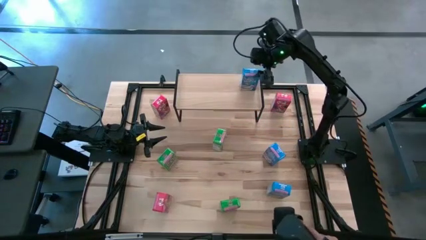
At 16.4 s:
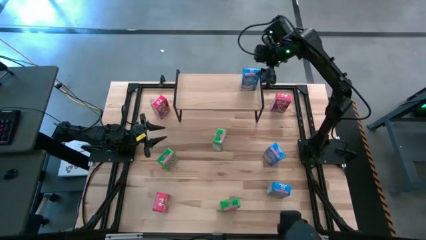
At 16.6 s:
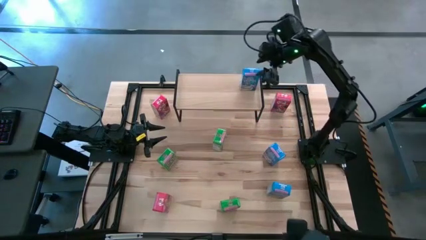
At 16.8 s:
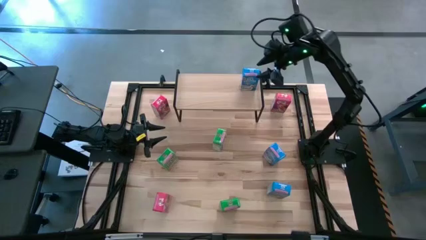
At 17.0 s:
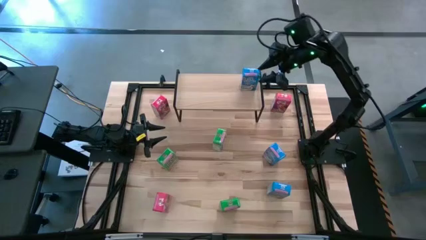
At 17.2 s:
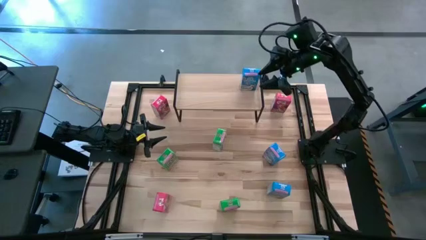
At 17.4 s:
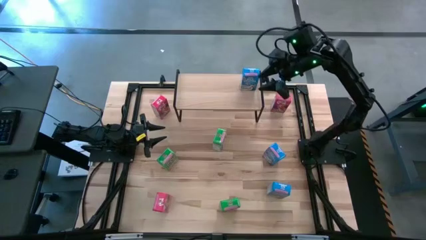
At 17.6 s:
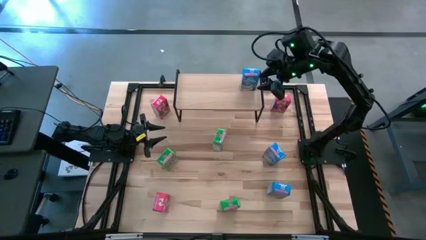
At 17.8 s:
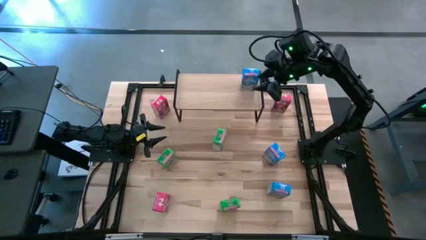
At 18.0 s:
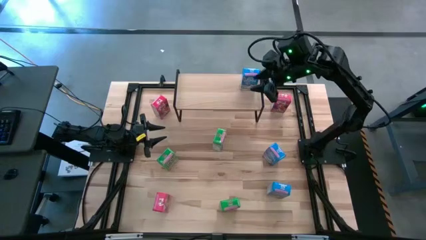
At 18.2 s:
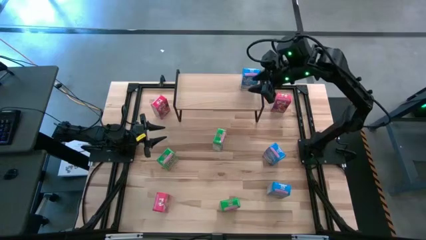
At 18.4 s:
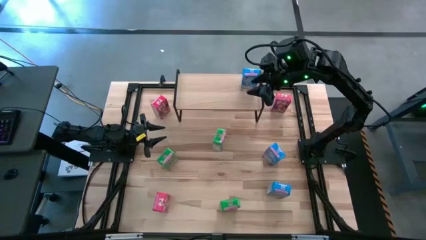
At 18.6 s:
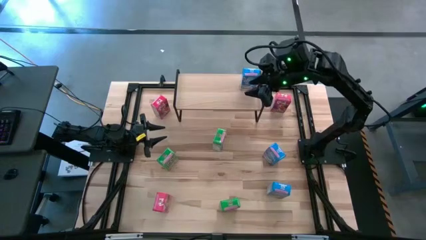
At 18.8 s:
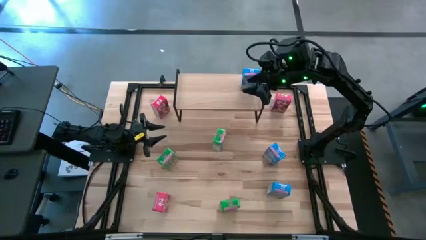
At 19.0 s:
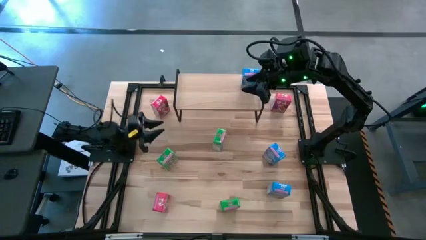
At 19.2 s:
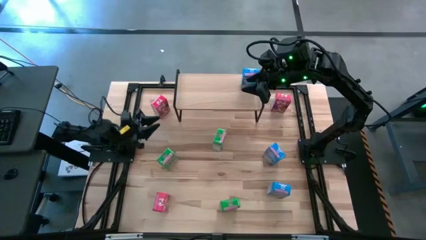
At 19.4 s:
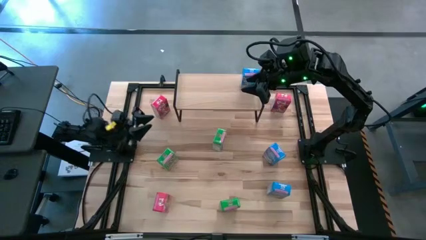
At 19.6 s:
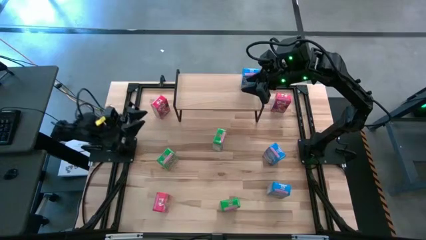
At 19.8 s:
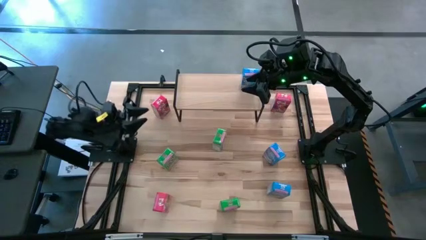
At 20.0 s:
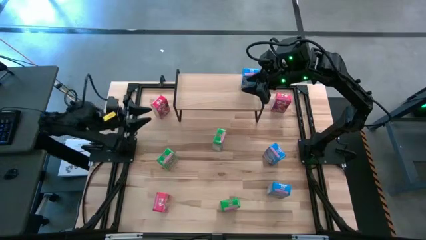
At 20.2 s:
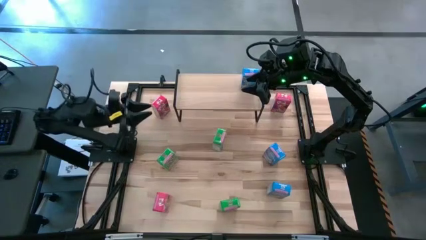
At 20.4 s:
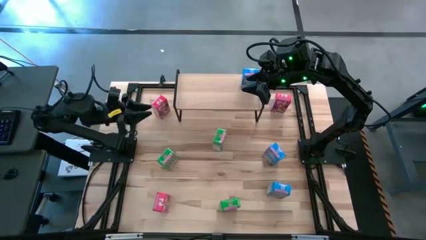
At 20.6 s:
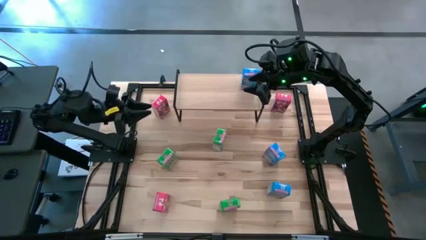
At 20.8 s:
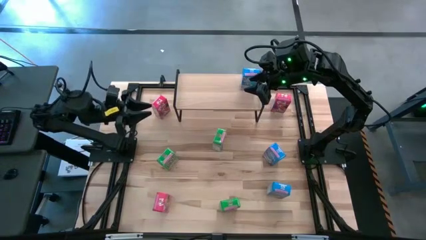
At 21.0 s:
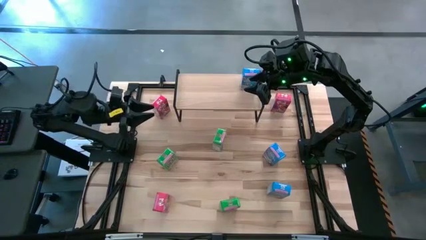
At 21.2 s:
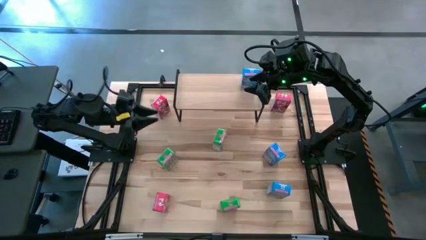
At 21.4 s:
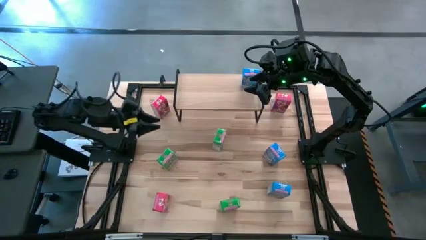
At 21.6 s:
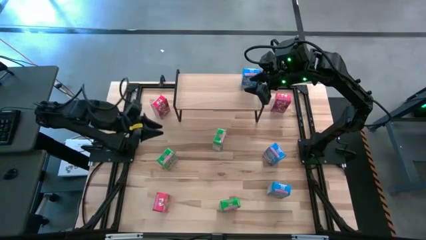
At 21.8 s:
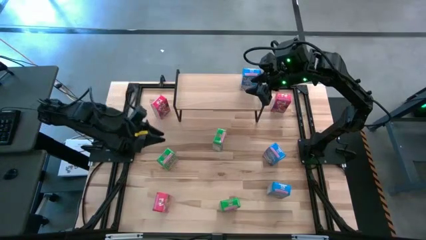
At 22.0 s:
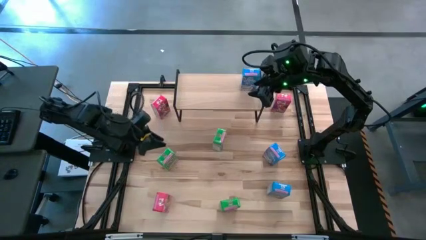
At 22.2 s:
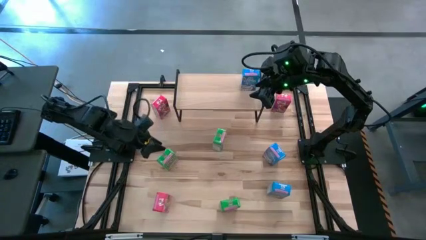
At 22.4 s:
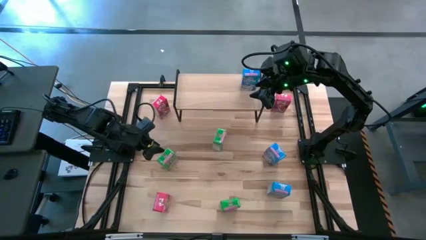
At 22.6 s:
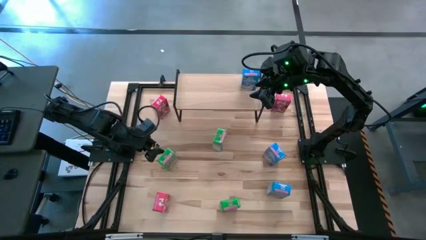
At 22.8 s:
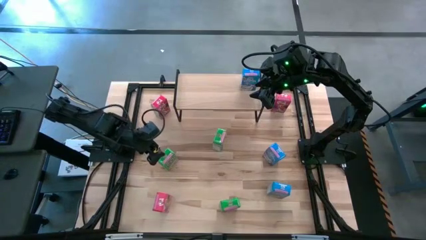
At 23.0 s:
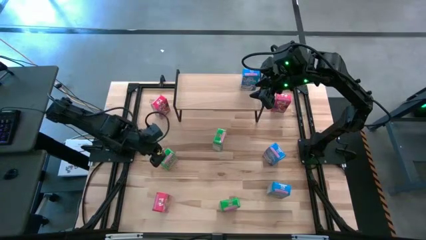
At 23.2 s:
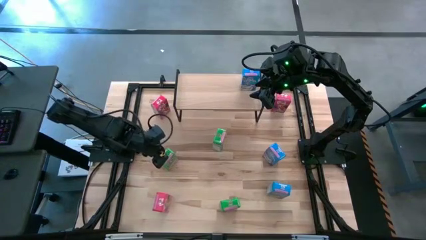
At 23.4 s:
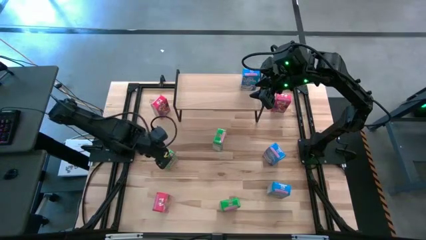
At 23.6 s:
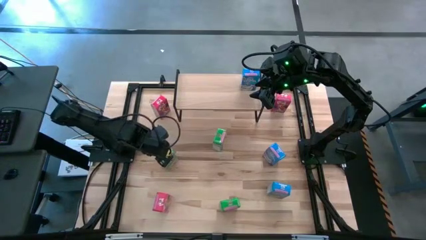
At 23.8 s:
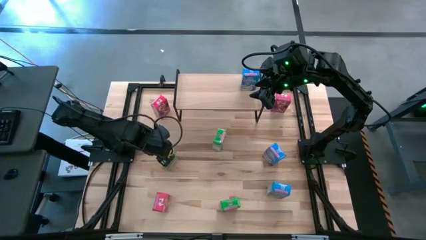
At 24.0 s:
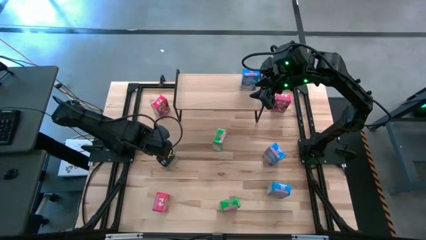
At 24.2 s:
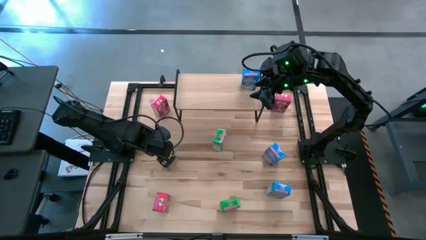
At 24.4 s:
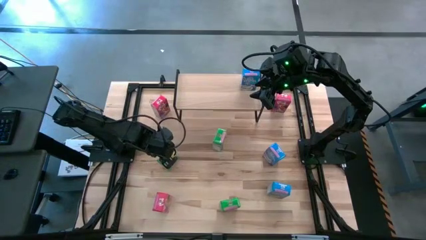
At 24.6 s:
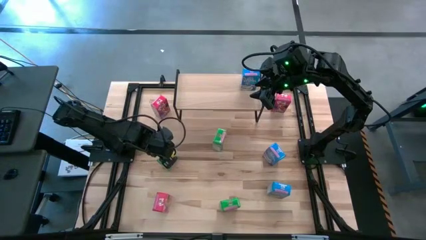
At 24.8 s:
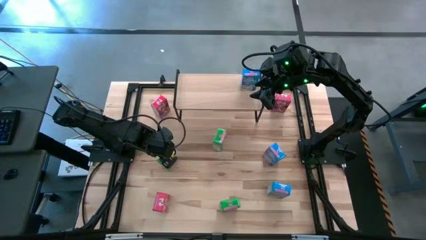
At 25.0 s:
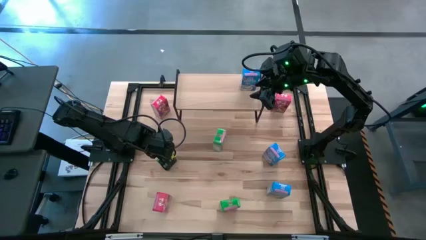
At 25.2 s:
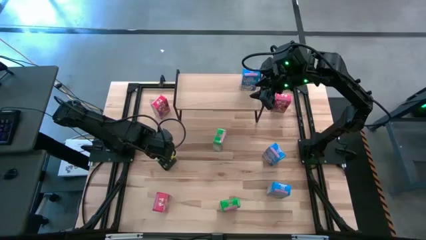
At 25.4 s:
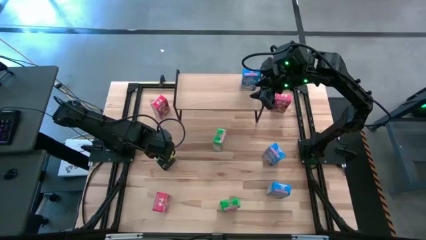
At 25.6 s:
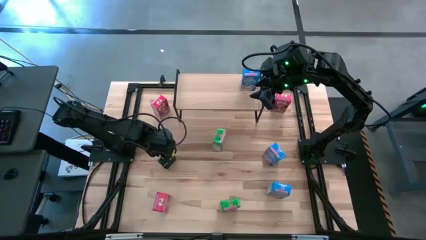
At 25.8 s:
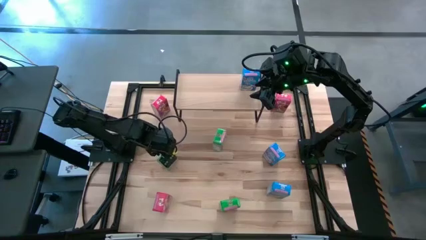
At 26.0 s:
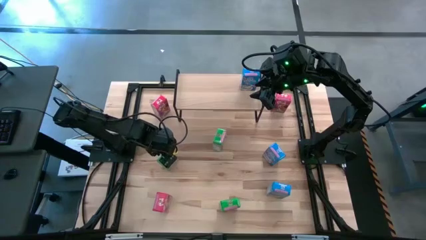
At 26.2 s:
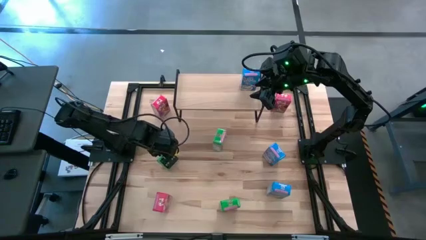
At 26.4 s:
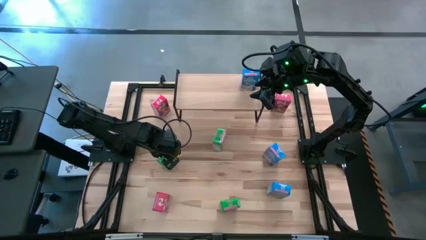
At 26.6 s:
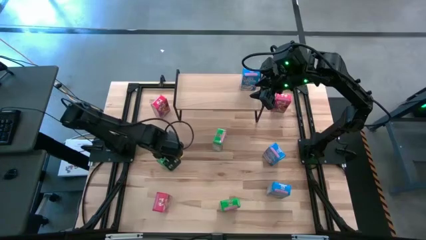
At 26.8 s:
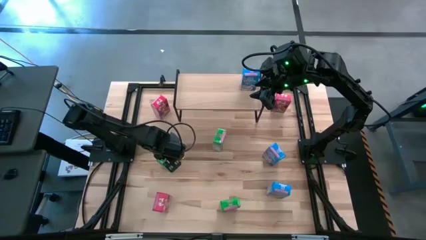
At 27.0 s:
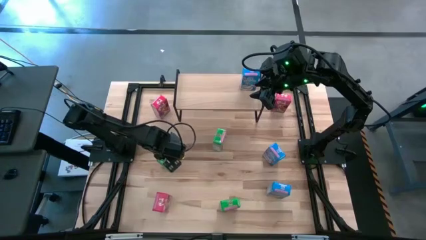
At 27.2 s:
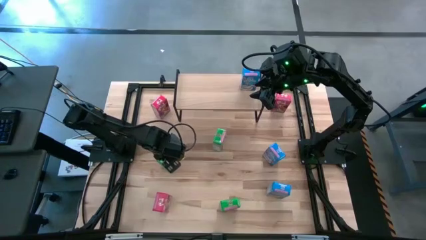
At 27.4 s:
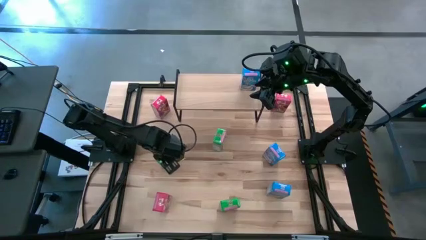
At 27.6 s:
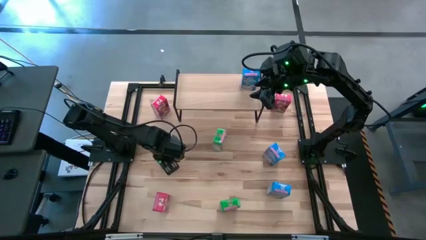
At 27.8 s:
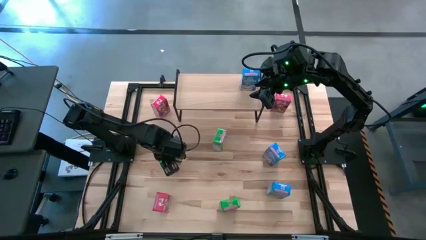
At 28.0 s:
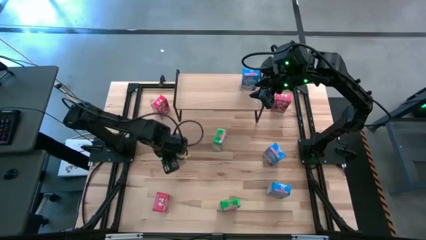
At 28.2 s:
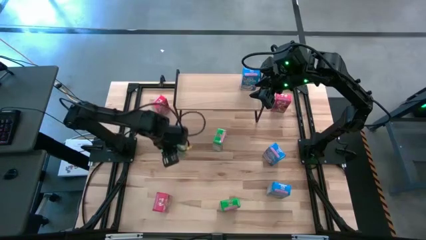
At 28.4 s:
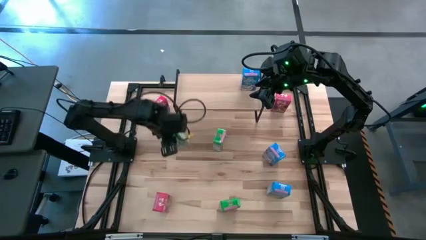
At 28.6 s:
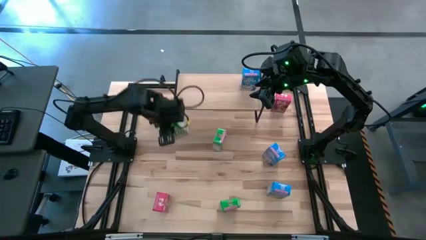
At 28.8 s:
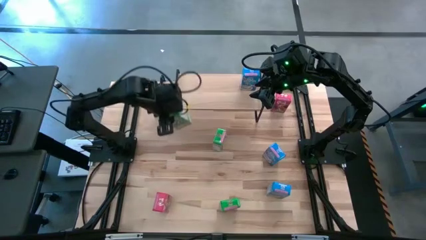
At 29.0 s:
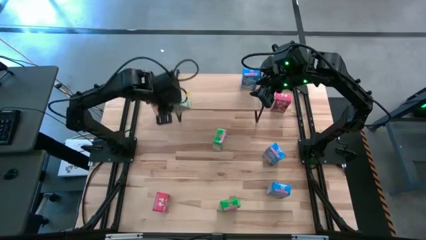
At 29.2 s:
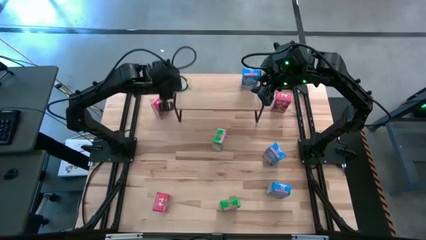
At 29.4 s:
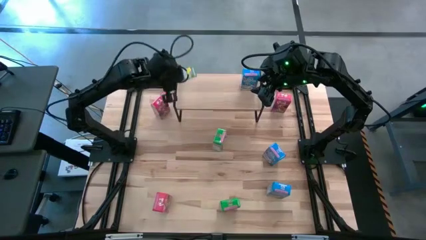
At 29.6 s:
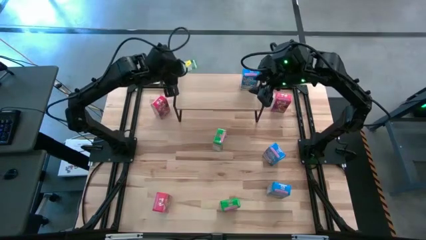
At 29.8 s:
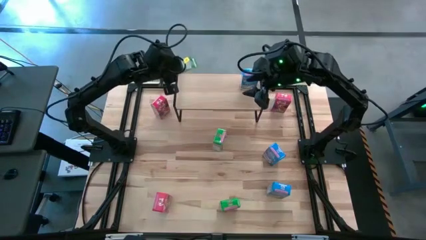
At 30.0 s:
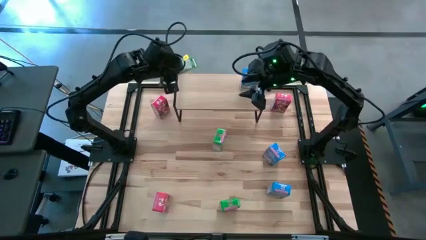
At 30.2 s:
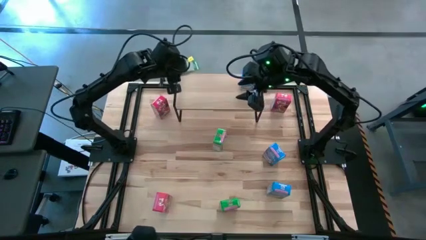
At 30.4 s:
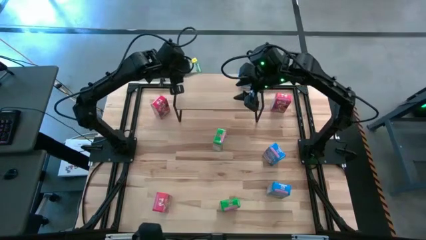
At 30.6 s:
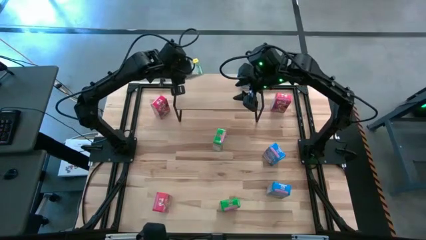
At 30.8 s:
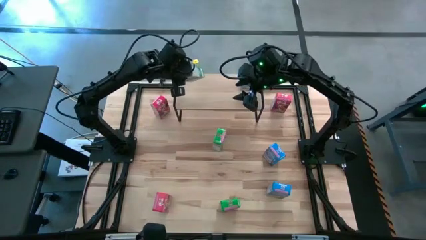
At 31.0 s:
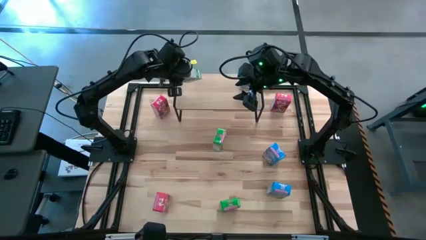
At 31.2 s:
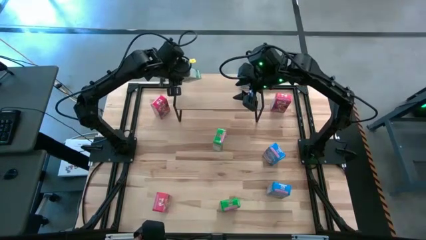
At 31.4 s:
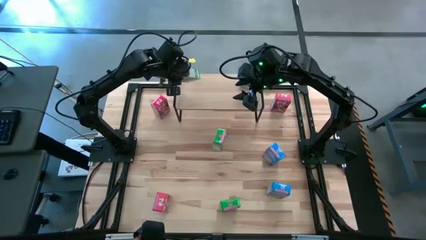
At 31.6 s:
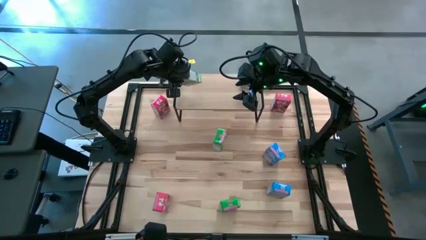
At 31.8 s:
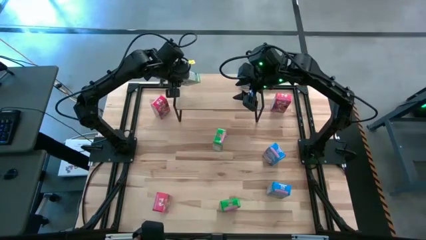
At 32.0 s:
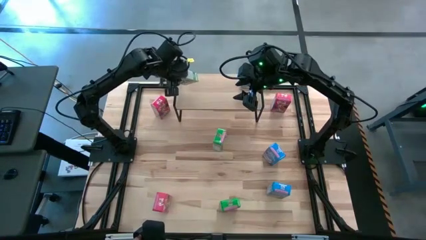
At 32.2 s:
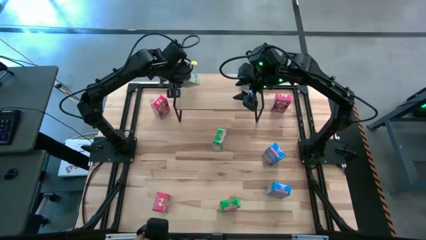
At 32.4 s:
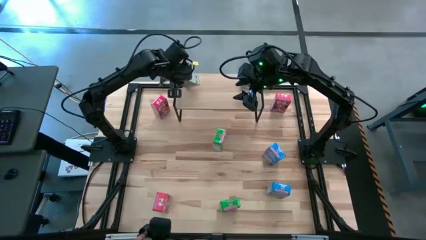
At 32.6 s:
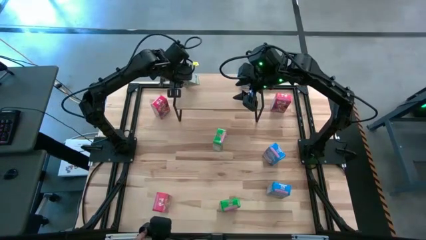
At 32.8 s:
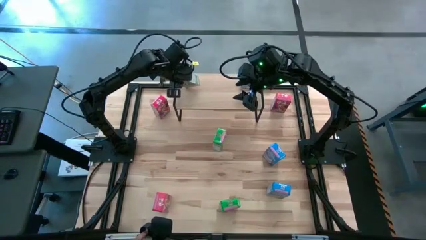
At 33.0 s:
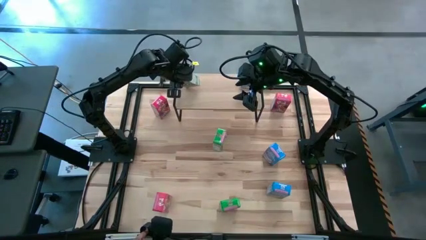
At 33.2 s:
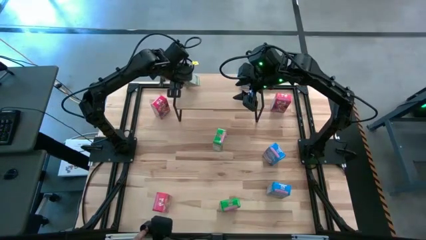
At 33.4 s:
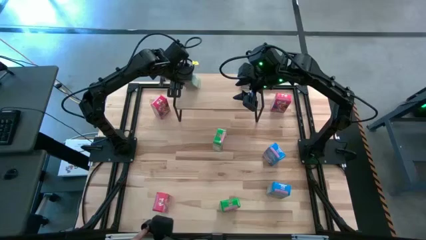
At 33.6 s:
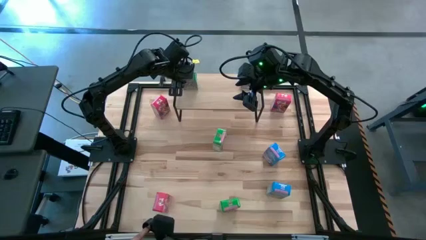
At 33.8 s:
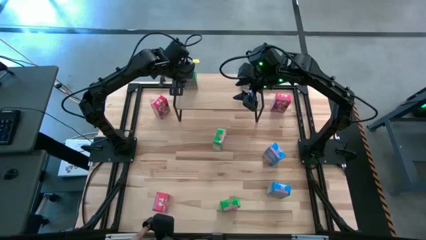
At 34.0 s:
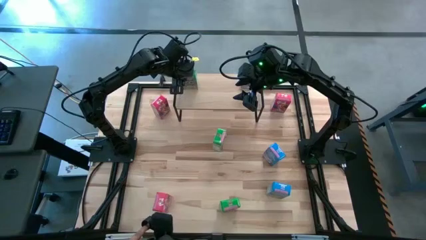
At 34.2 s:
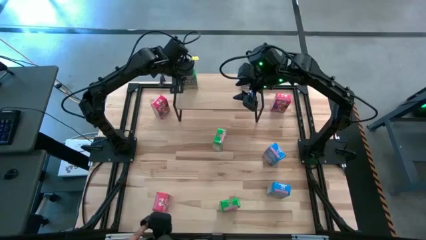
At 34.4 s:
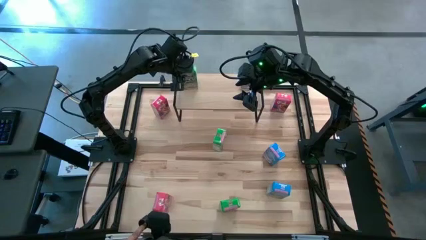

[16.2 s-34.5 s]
Task: Stack cereal on shelf
Put the left green cereal box on the shelf
